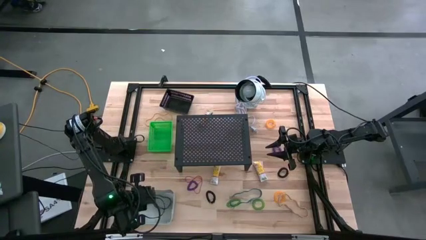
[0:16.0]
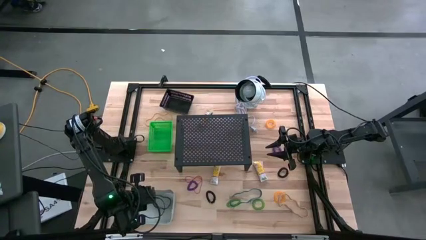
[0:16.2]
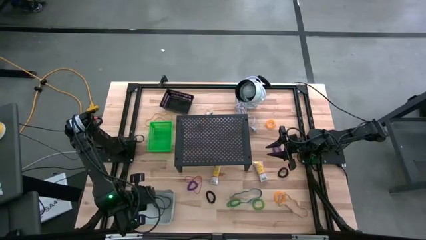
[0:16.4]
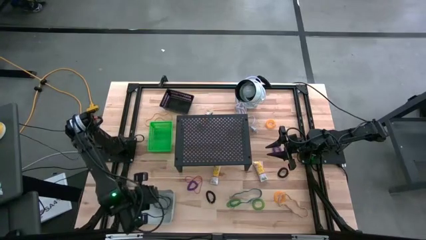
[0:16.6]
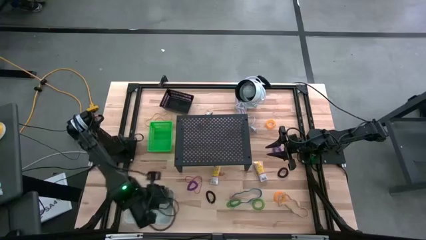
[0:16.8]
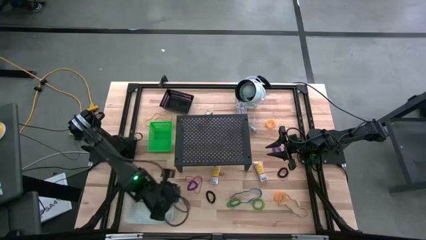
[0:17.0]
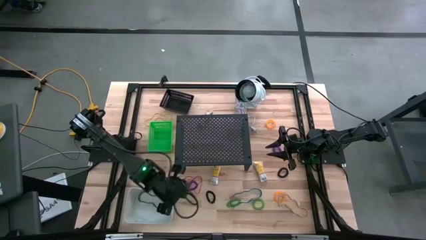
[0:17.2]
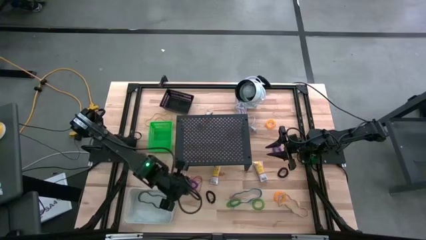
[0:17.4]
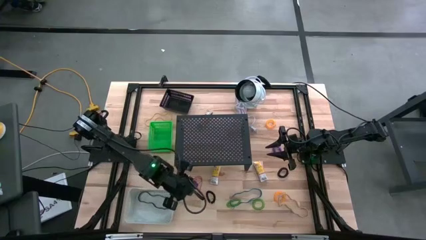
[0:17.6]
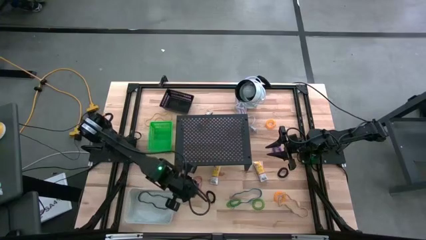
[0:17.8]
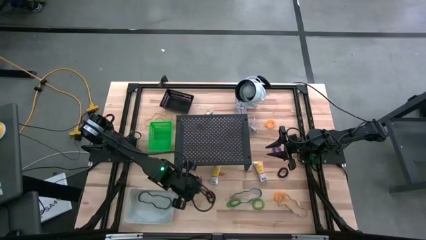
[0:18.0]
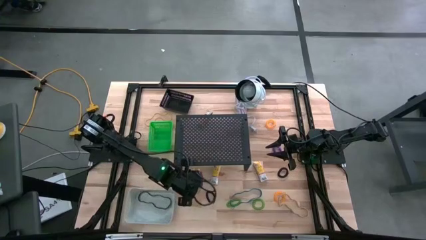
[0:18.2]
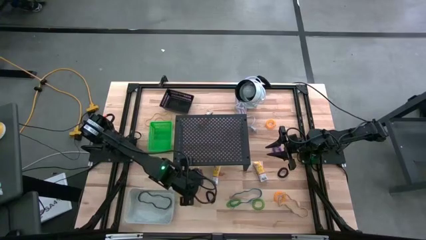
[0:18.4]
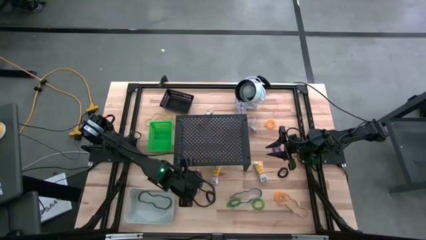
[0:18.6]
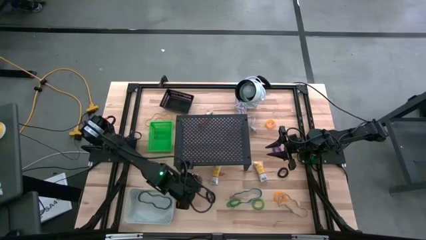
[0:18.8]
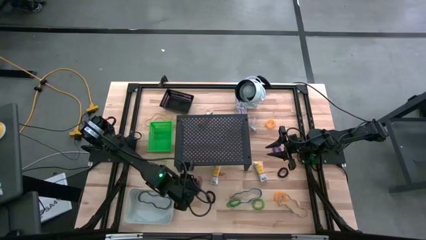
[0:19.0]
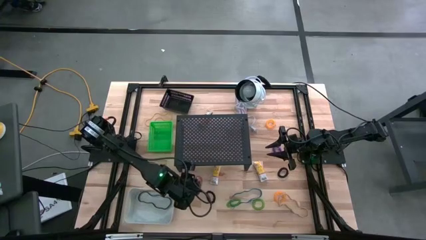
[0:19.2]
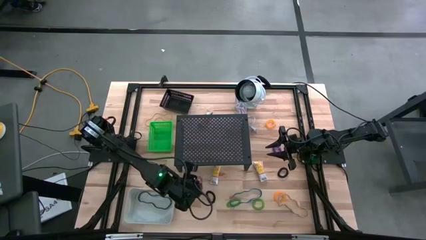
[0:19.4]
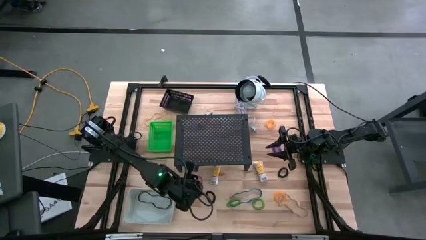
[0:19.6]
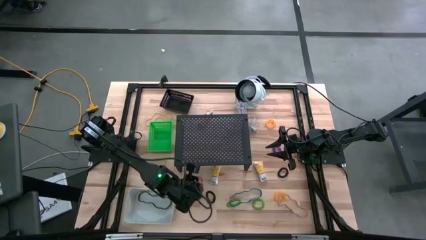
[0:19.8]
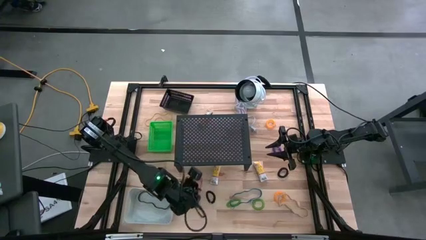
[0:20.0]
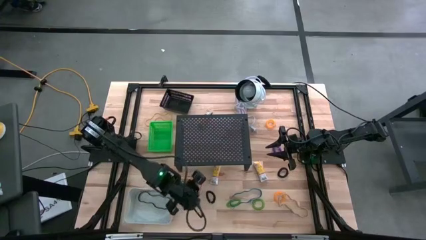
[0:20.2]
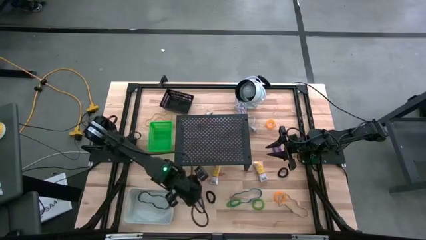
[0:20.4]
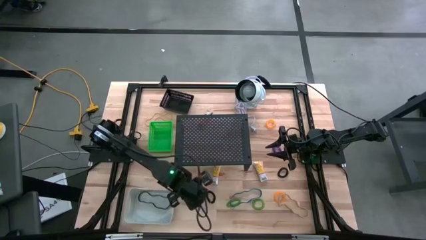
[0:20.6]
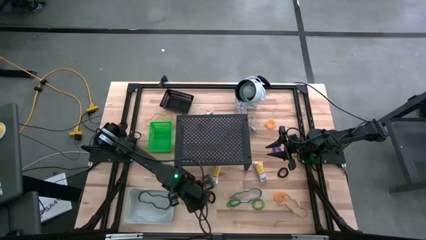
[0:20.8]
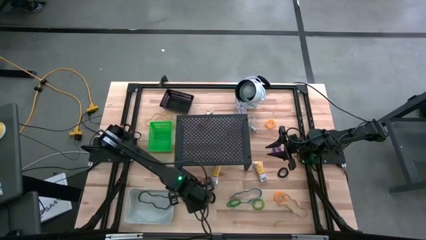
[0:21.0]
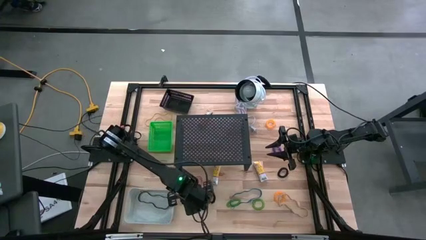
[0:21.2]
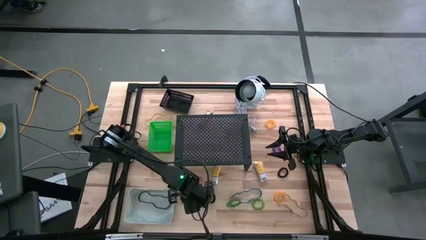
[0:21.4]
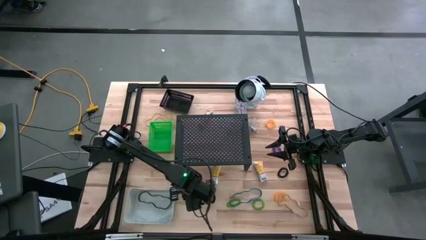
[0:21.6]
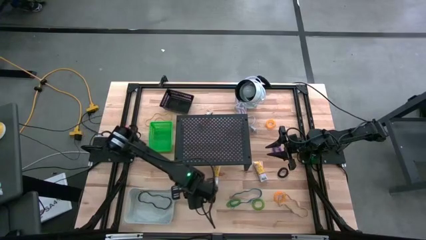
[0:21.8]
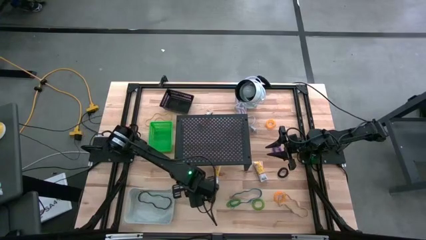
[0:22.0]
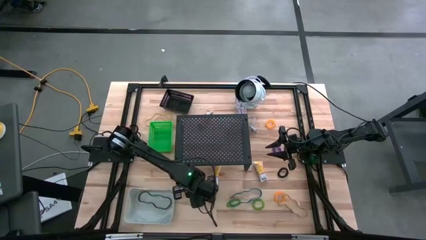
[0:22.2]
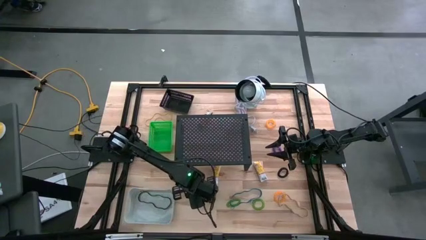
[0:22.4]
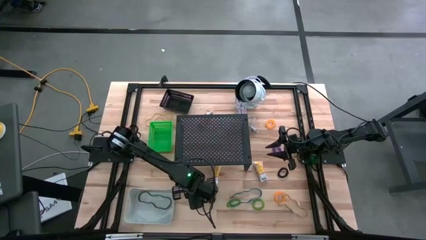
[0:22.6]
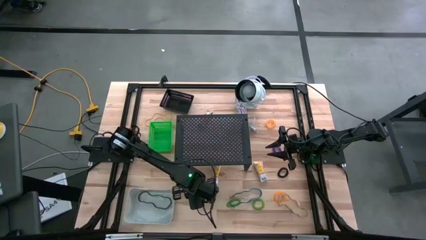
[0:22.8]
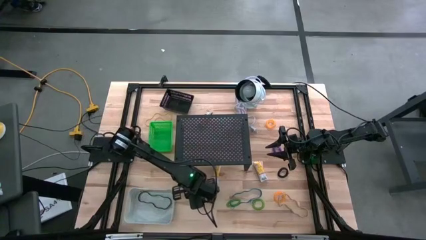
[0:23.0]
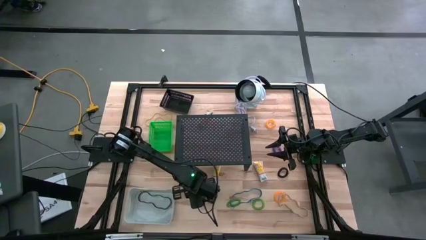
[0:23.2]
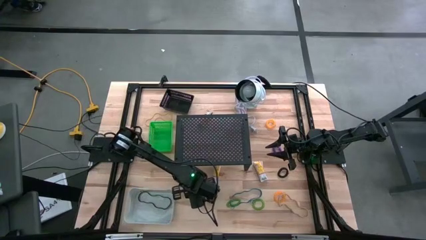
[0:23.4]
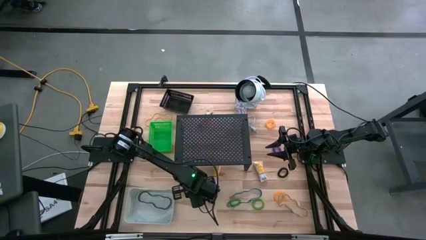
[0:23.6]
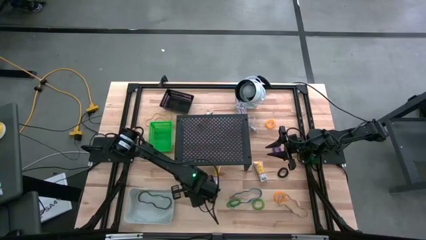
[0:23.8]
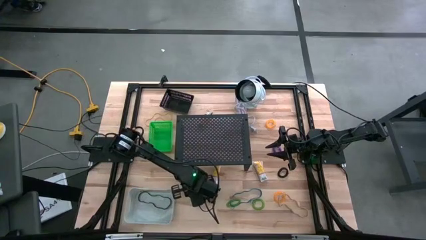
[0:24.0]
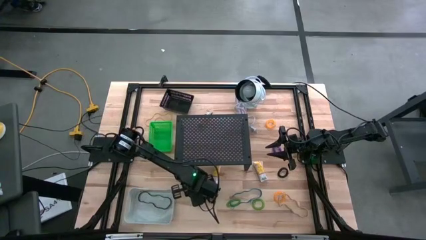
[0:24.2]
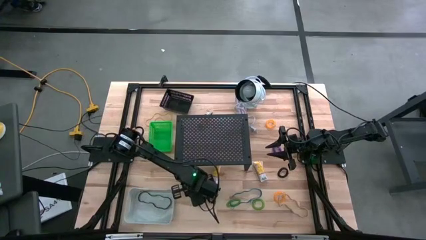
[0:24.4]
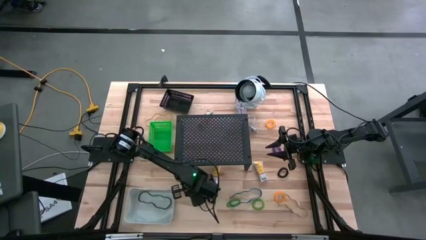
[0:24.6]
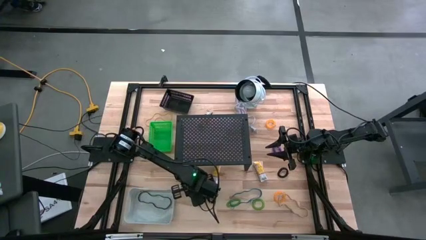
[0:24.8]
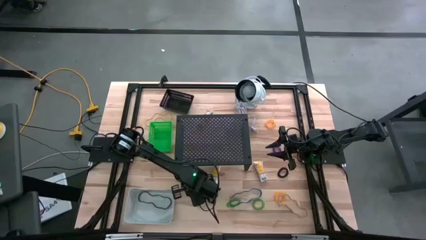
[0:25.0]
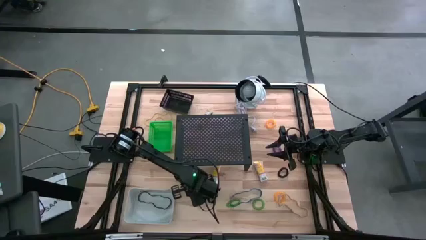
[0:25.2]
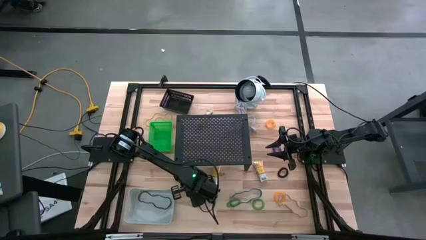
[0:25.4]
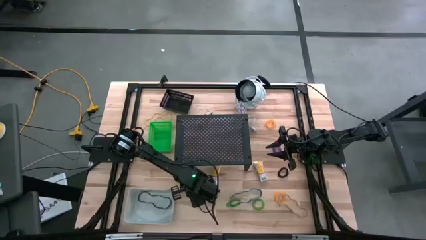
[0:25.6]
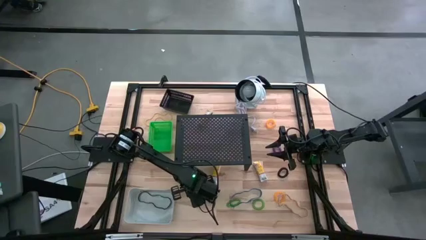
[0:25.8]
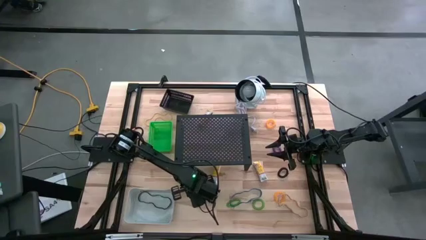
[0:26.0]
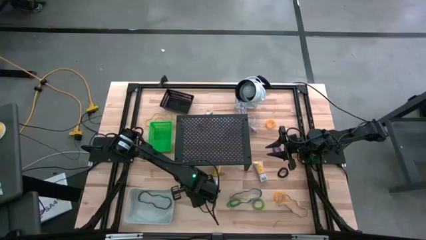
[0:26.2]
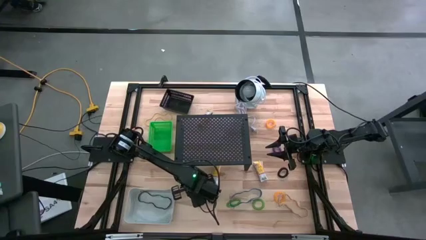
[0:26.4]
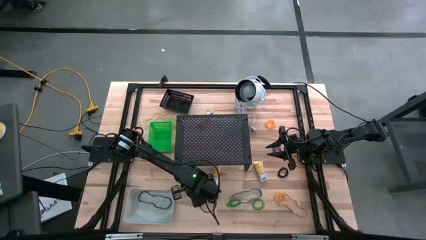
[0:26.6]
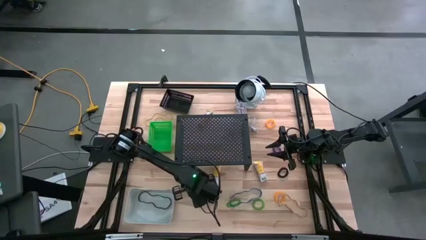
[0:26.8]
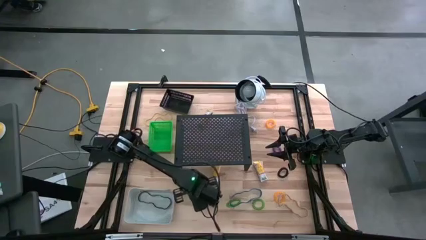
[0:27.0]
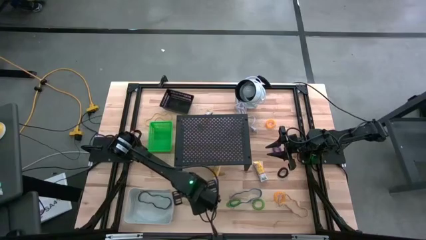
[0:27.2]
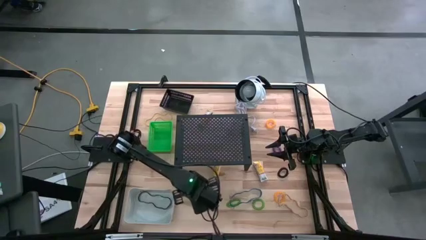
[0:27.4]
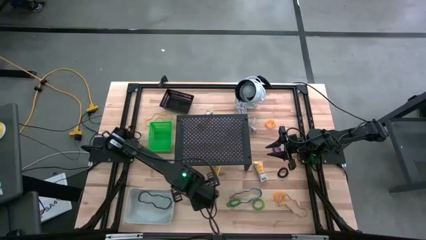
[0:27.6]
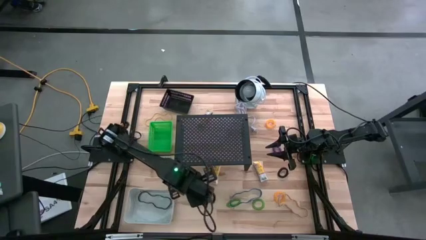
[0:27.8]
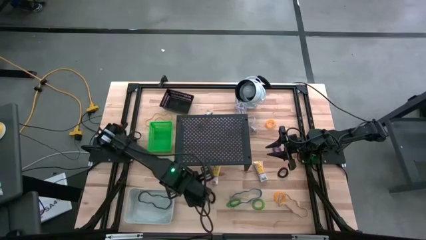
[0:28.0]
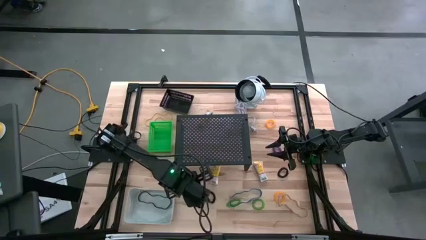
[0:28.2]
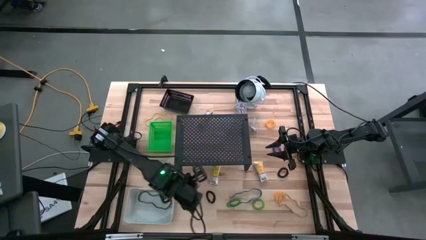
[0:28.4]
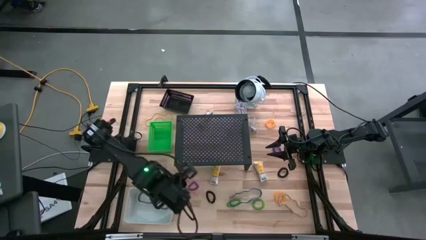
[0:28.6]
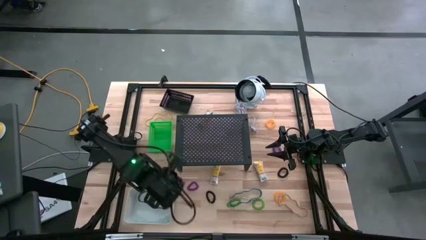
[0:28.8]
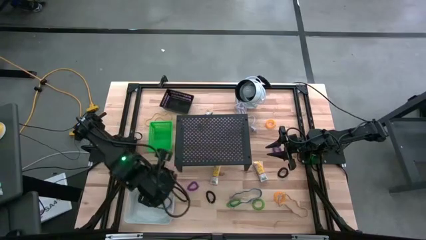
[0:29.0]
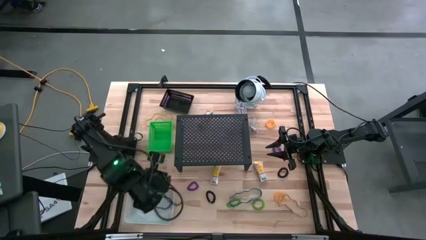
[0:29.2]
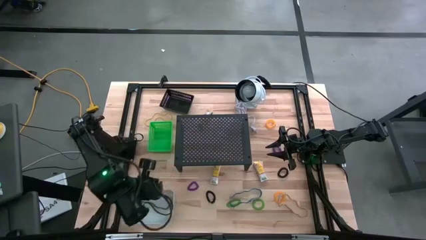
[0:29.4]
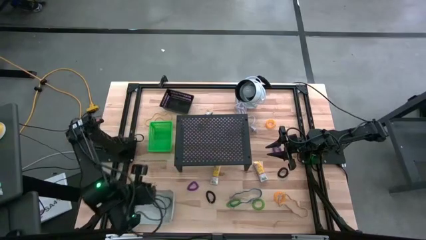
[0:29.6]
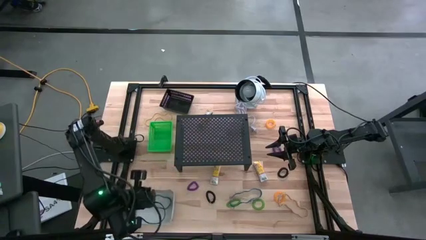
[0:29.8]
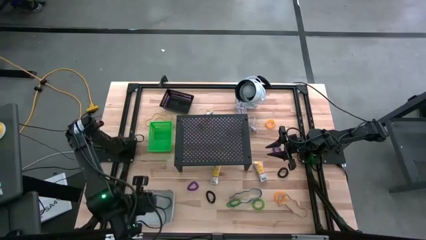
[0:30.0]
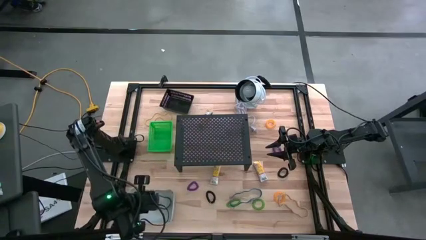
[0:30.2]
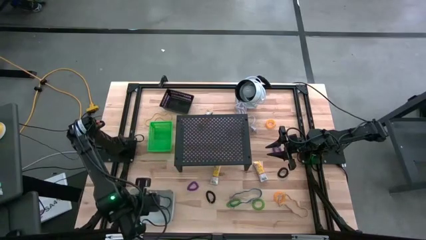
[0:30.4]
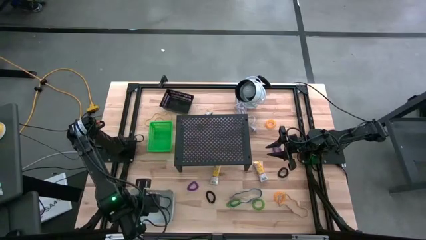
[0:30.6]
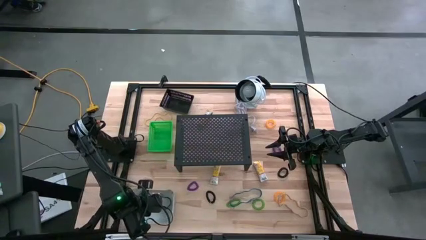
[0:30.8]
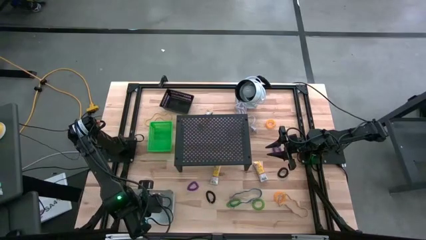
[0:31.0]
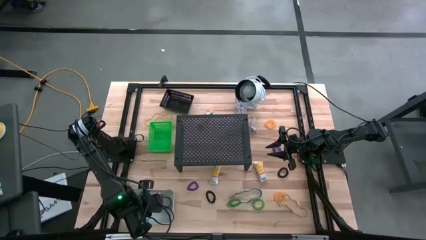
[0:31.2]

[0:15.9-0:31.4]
Task: Pick & Place Office Desk Supplies
Put the red rubber band into the white bin

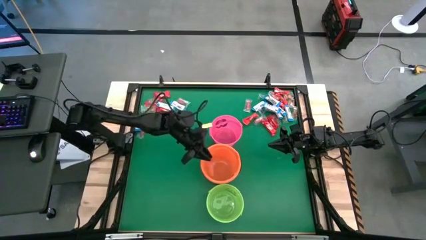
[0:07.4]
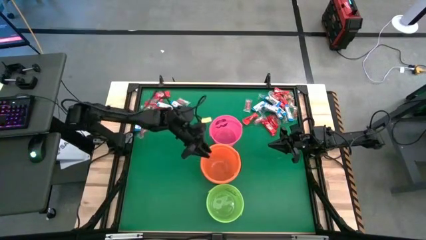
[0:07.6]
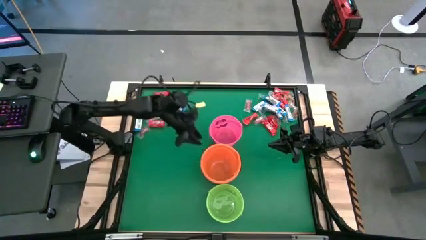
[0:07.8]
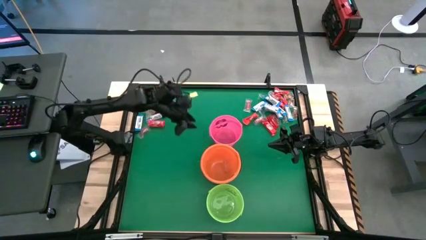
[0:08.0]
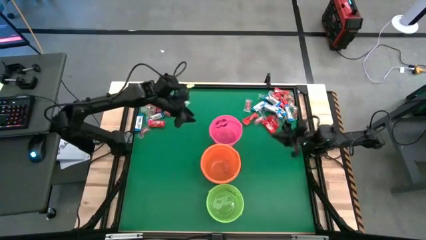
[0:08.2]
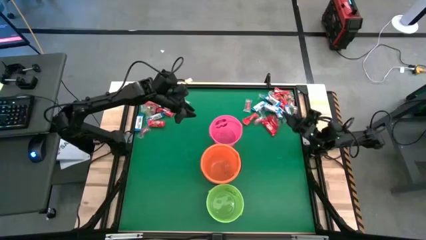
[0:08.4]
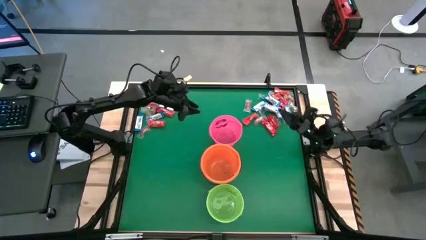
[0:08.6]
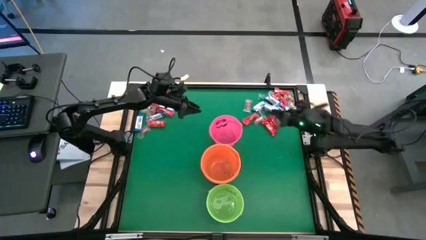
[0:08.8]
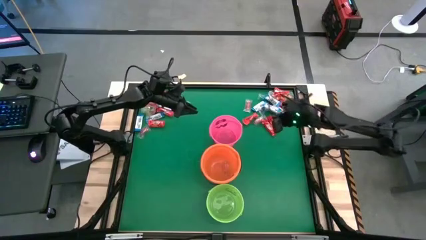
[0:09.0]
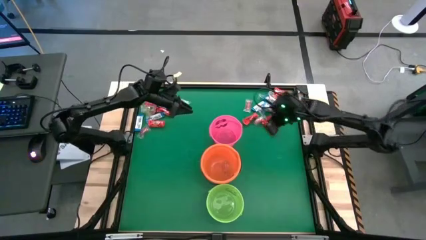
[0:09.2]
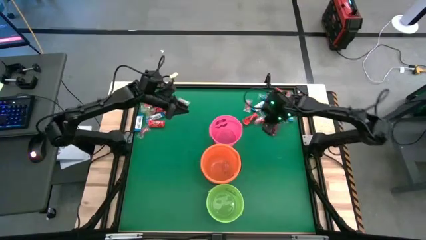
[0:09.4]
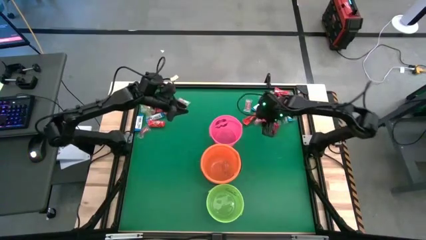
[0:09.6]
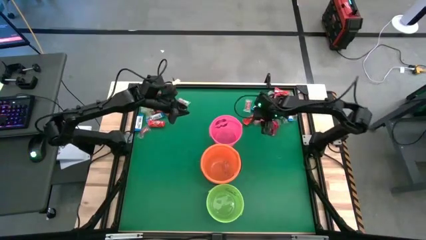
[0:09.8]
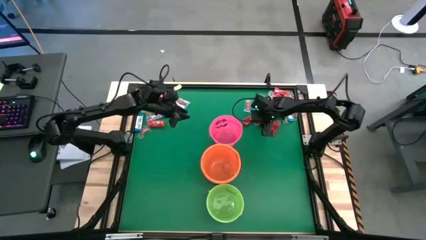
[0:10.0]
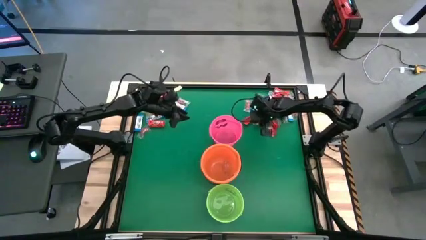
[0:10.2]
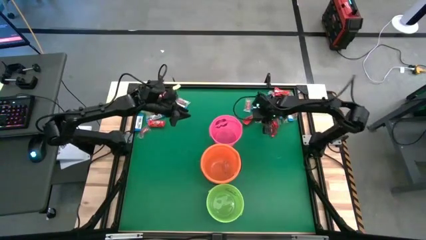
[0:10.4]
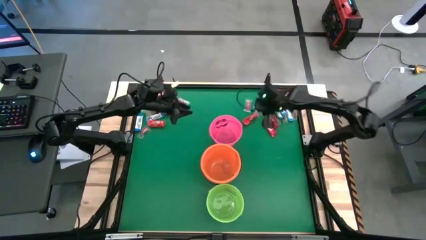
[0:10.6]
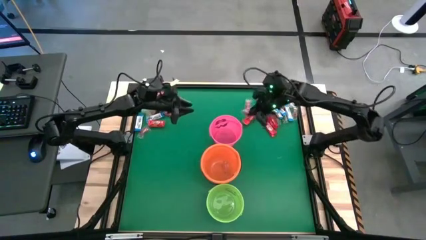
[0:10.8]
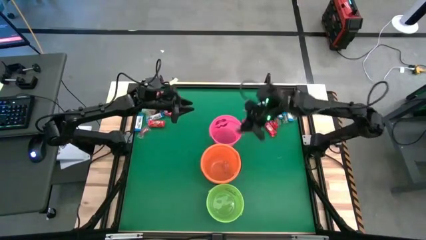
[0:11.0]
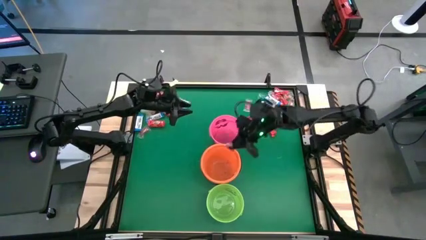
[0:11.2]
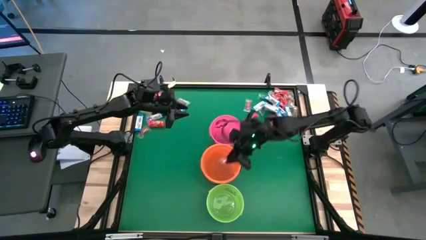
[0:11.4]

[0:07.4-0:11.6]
Task: Sort candy by brand, put in halloween buckets
Put the orange gummy into the orange bucket
